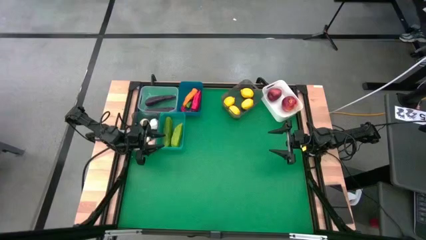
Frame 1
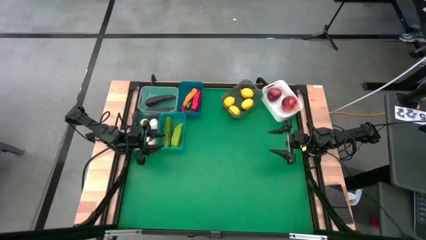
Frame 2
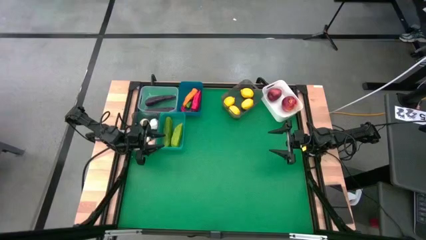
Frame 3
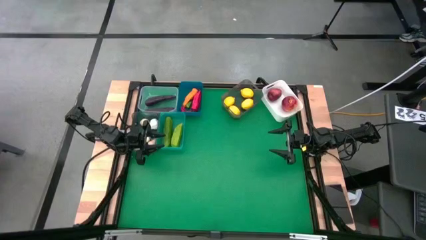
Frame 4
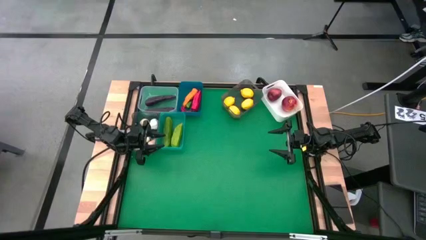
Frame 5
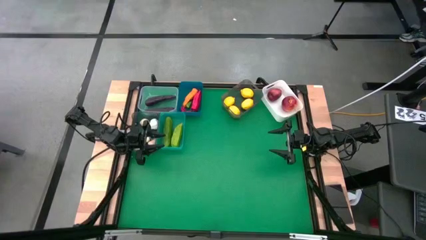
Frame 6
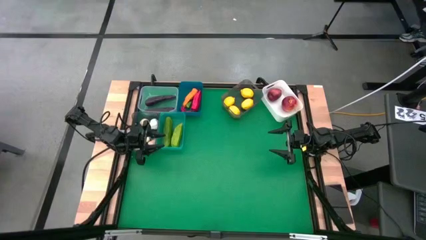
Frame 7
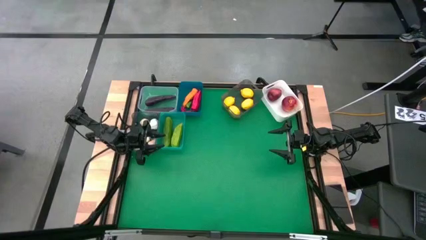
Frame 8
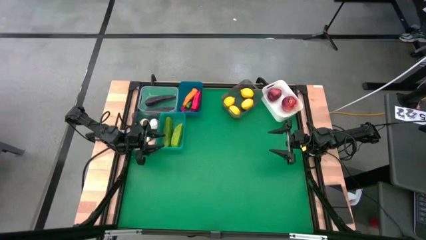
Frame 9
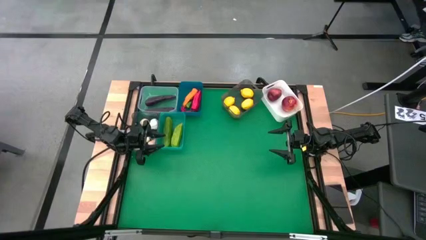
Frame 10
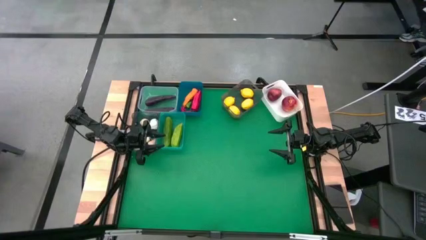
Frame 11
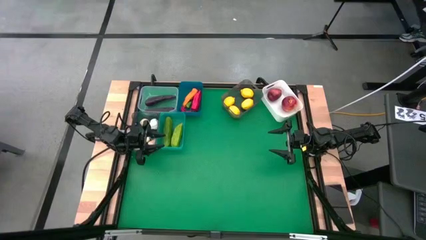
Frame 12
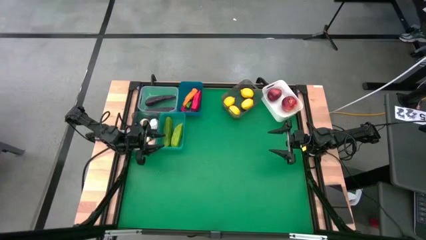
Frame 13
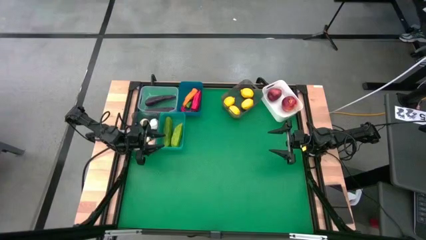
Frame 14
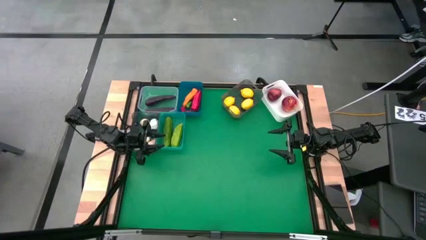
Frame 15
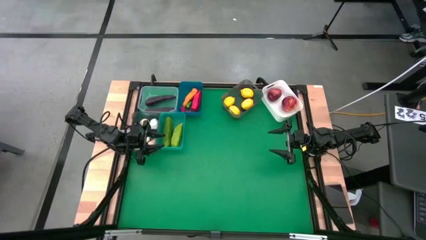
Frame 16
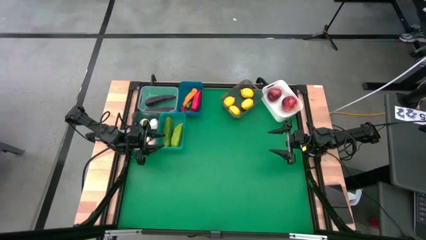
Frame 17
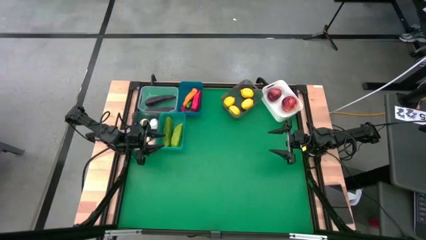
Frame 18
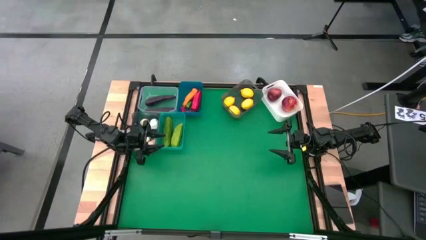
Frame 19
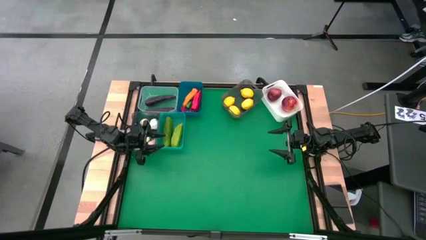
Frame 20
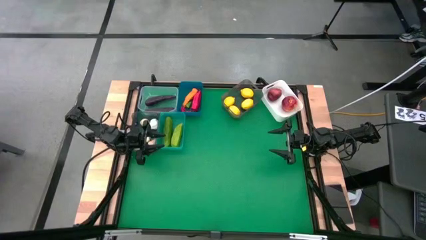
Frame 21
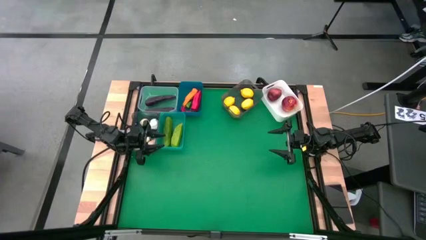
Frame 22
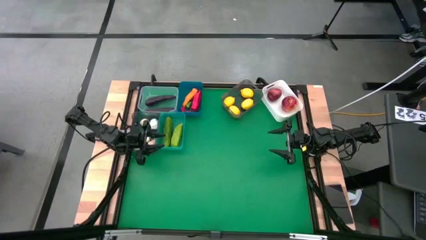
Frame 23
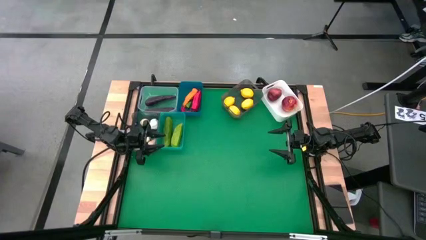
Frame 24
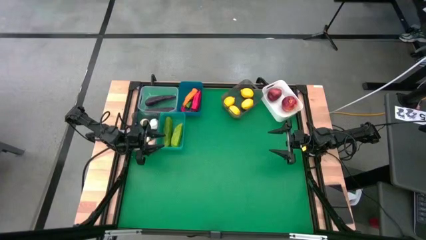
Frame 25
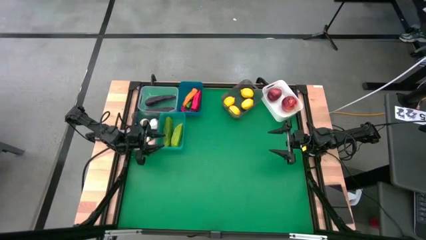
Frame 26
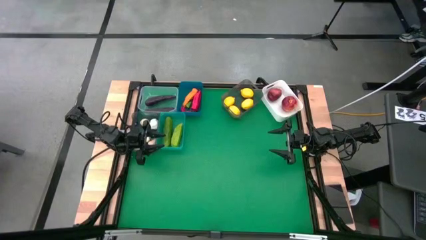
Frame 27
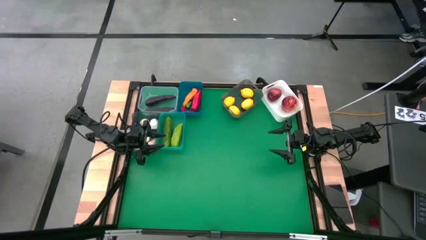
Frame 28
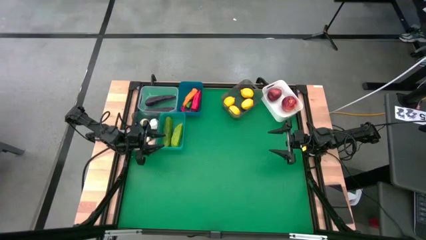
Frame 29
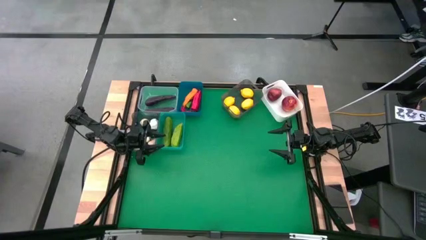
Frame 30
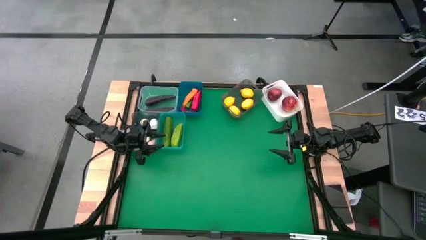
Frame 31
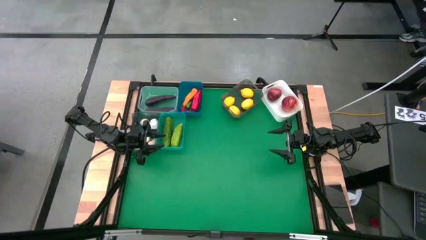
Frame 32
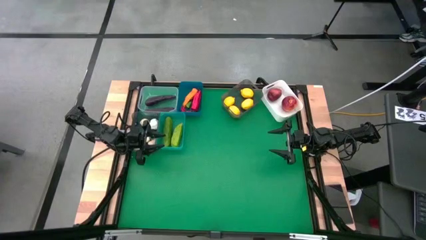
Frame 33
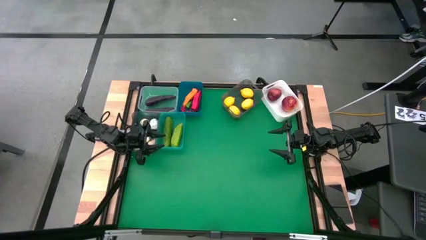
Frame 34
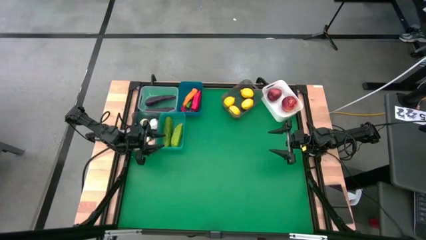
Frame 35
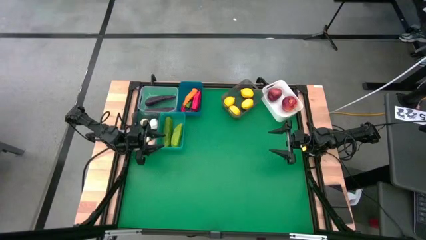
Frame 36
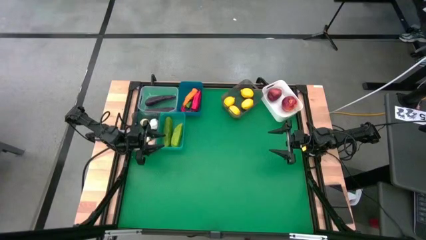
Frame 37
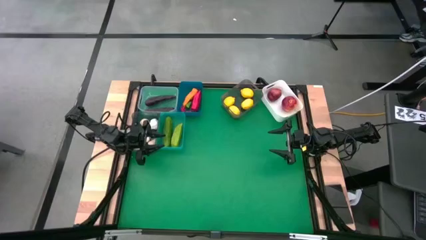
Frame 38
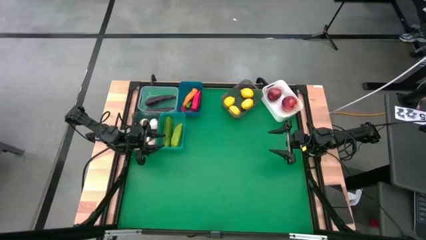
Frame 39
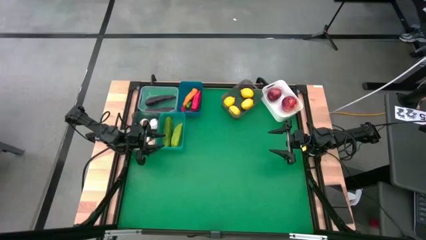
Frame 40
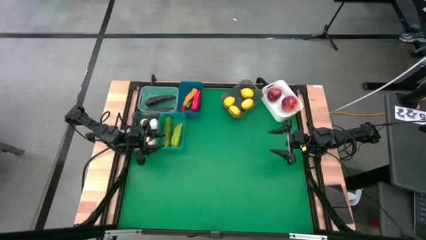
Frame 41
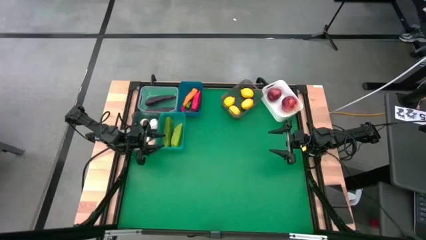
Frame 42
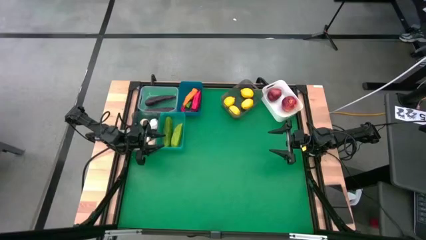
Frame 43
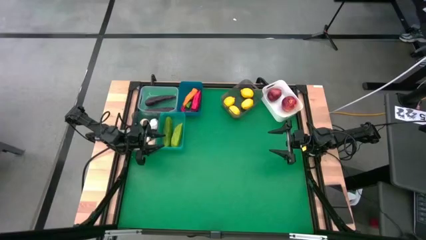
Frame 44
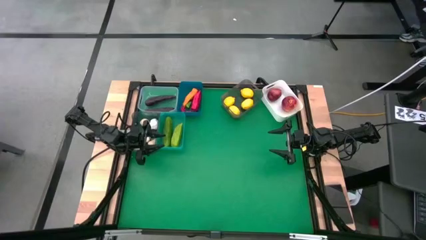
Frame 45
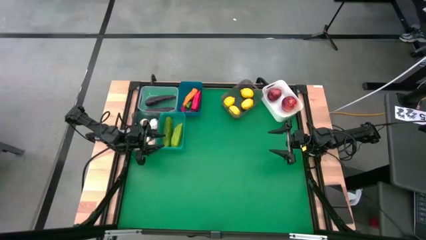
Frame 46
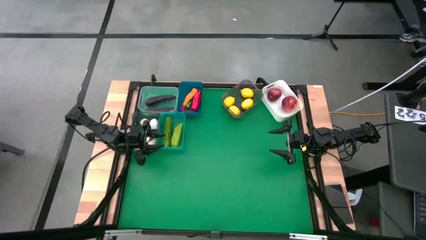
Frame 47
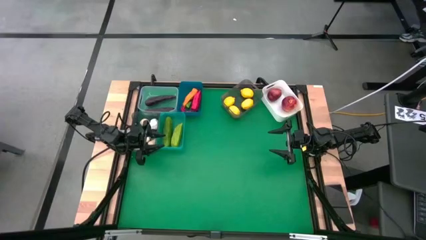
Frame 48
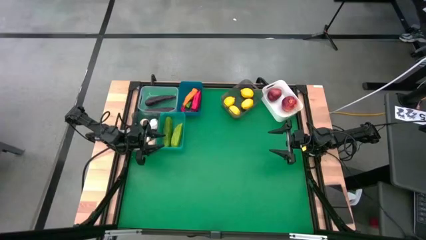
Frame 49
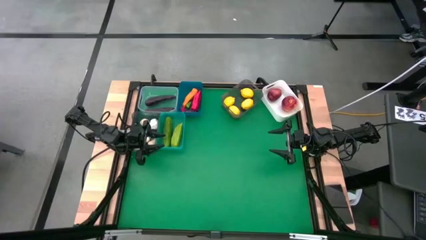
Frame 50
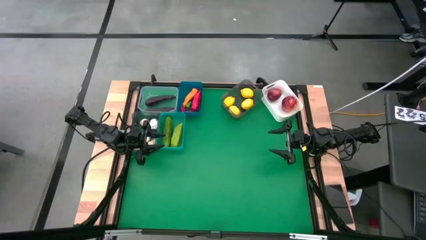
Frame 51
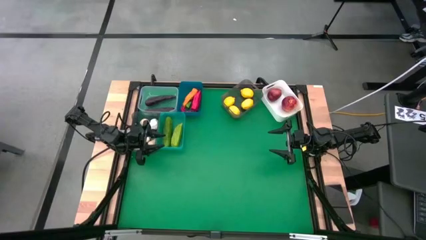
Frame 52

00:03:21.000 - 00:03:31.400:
Task: Sort produce into baskets
Return to Home Position

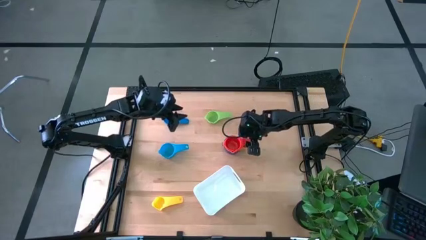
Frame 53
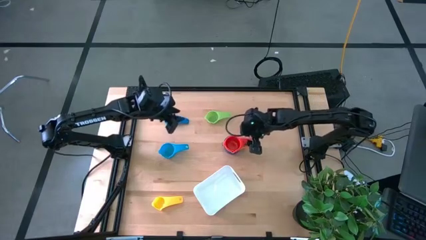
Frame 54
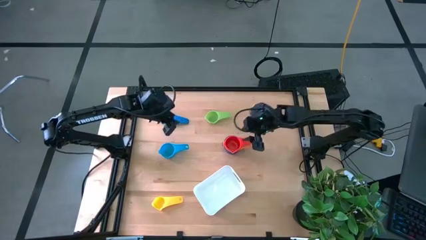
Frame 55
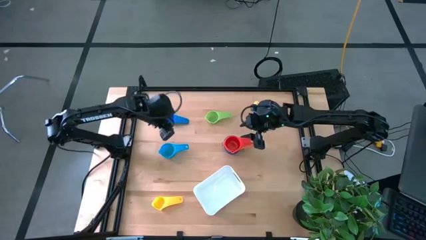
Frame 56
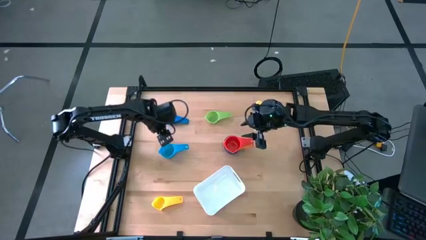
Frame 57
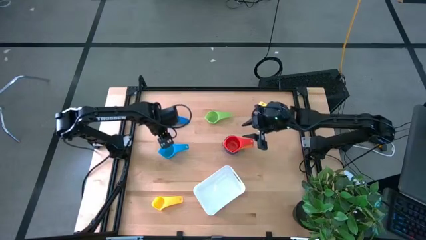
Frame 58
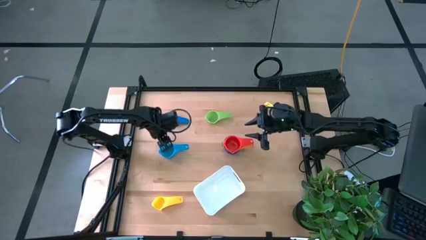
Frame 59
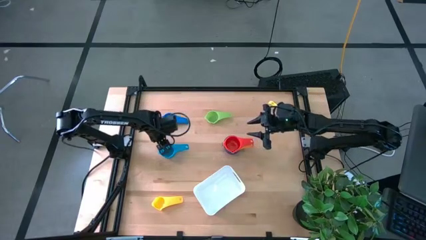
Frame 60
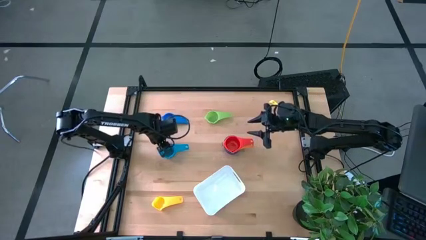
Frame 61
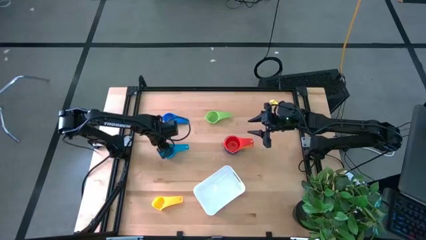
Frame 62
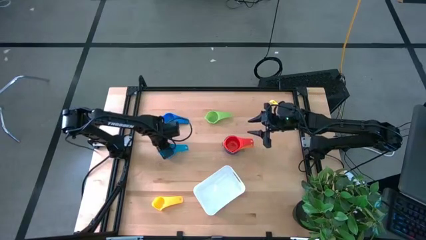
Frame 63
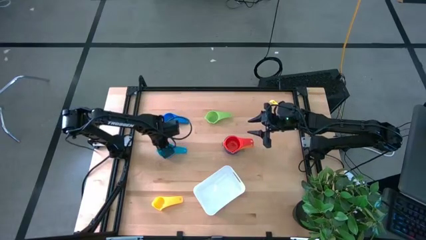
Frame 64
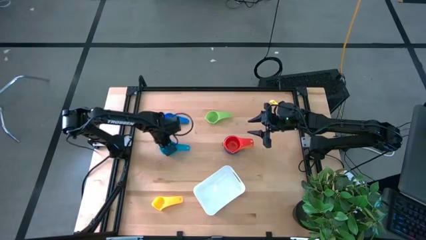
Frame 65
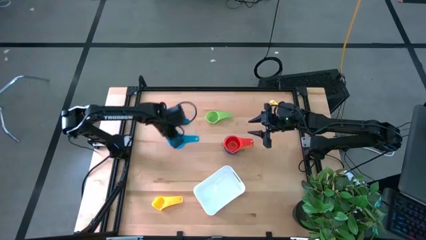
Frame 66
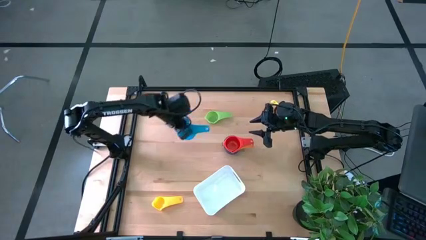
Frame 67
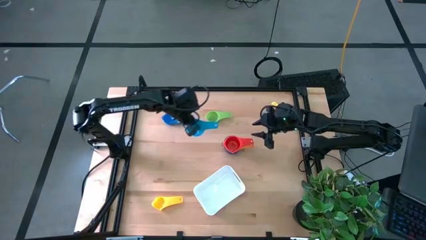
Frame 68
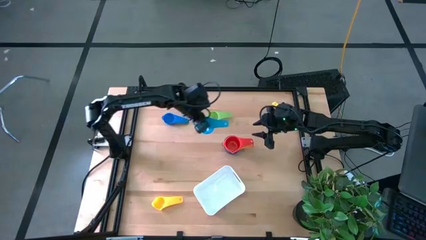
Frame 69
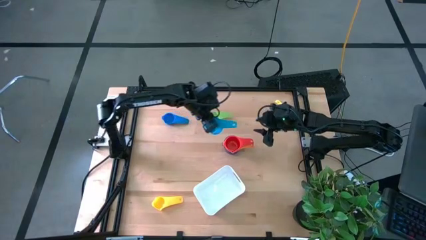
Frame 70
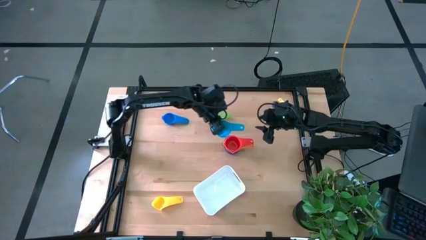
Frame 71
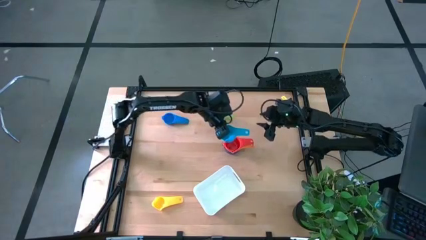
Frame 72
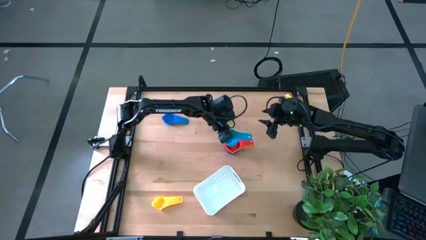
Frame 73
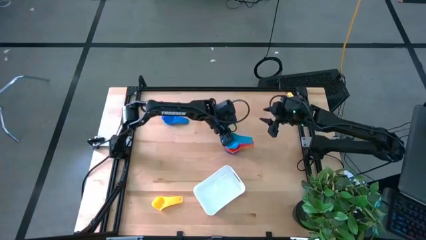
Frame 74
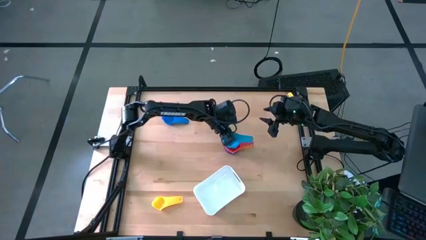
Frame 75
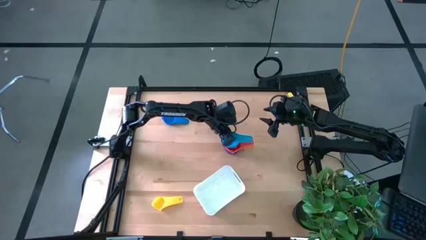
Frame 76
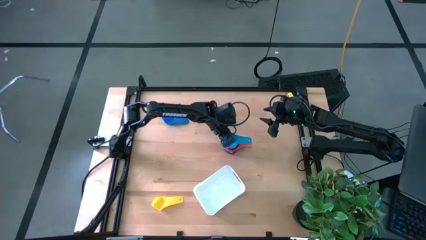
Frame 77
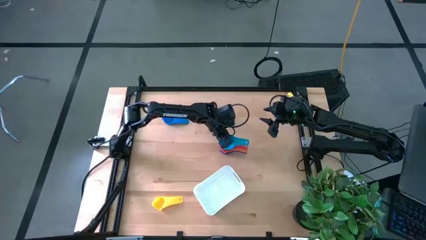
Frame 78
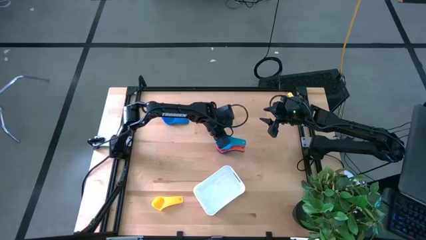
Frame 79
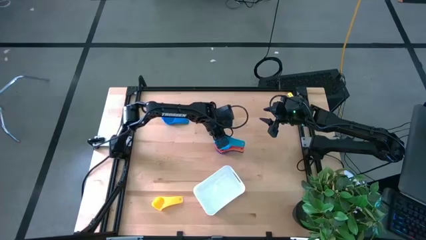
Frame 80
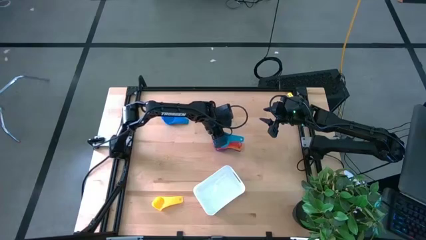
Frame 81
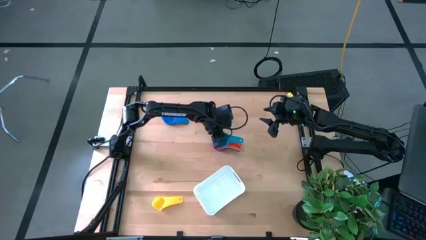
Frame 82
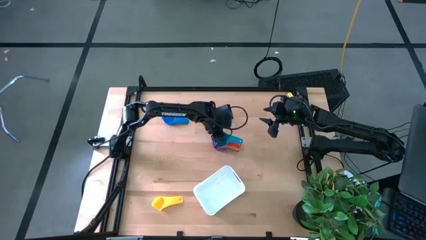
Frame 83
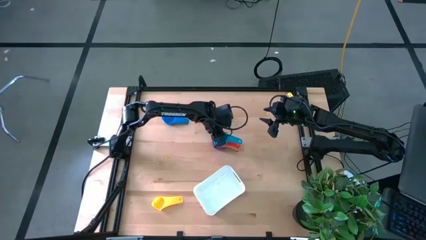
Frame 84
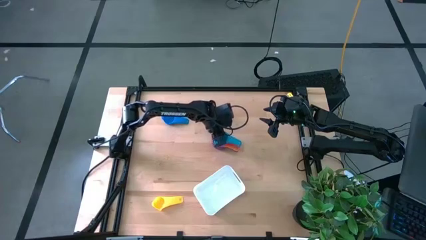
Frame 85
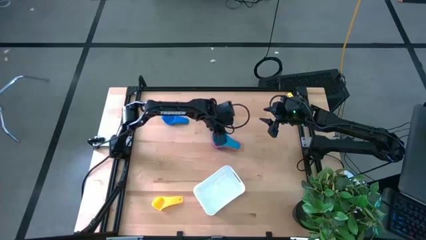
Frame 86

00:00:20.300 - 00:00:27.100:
Task: Nest measuring cups in basket
Stack the light blue measuring cup on top of the red measuring cup
